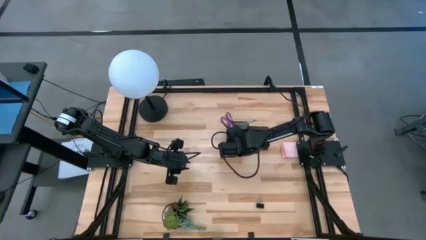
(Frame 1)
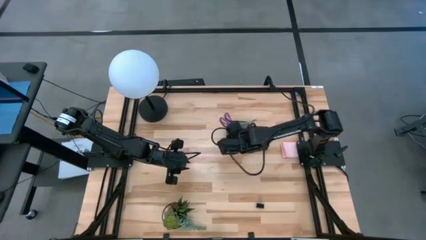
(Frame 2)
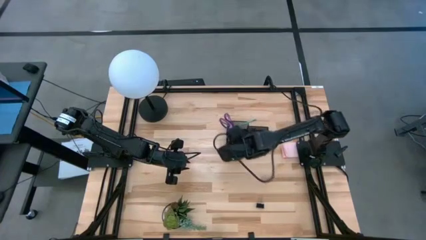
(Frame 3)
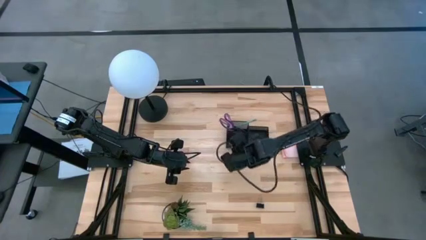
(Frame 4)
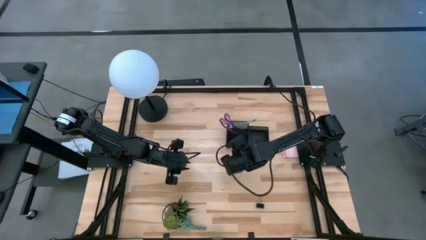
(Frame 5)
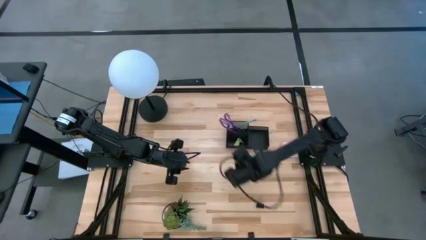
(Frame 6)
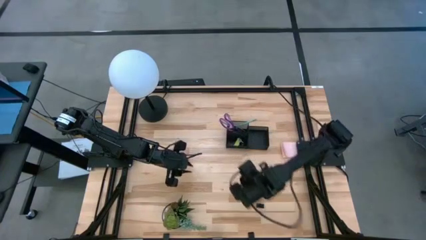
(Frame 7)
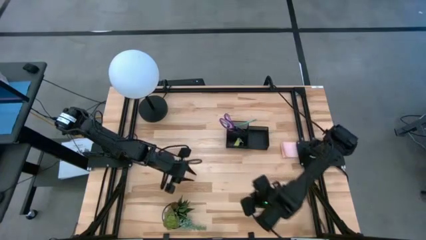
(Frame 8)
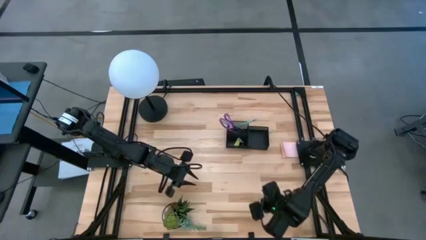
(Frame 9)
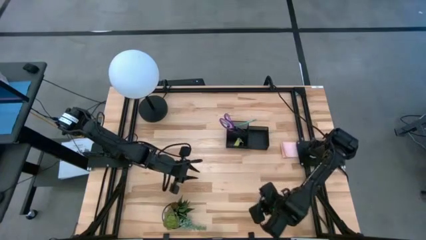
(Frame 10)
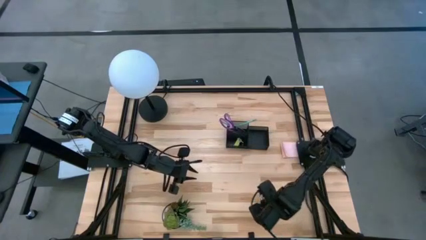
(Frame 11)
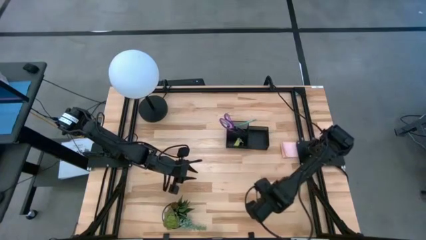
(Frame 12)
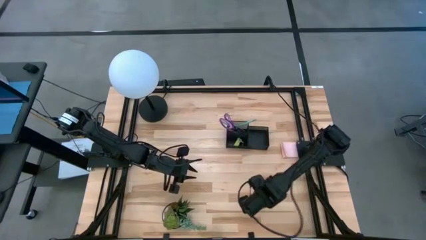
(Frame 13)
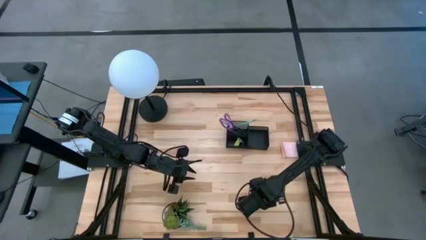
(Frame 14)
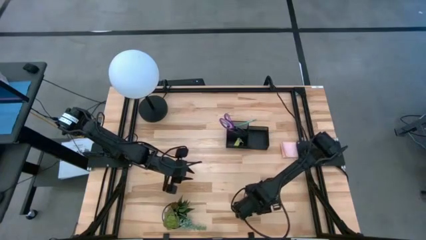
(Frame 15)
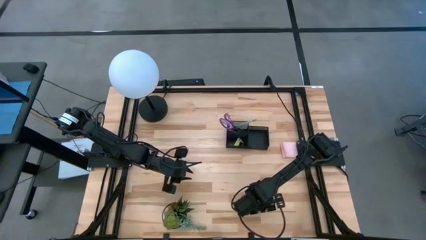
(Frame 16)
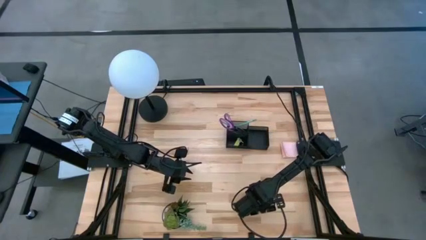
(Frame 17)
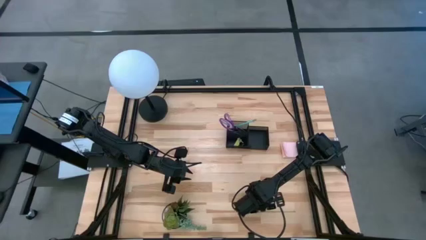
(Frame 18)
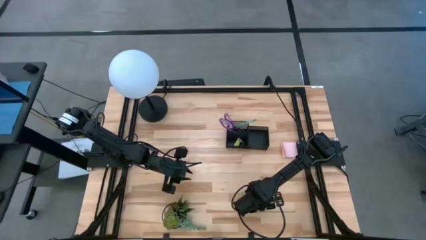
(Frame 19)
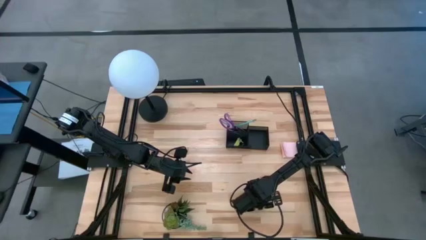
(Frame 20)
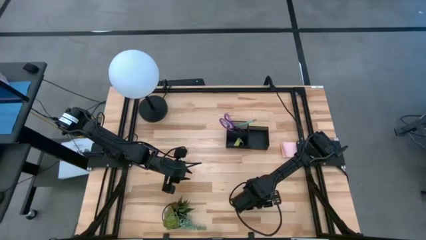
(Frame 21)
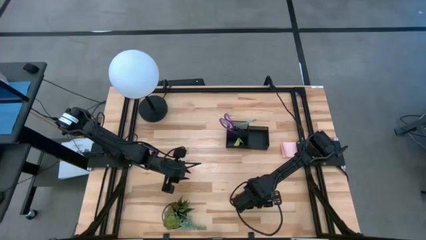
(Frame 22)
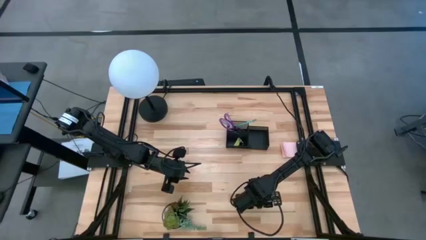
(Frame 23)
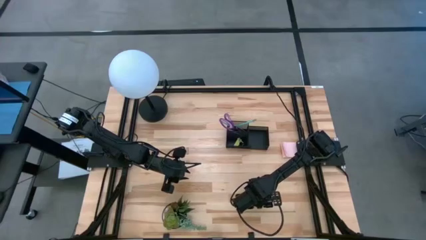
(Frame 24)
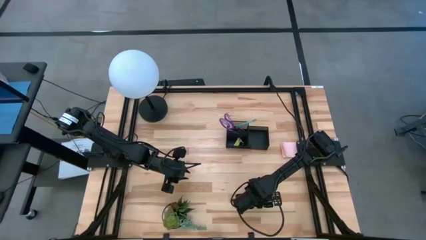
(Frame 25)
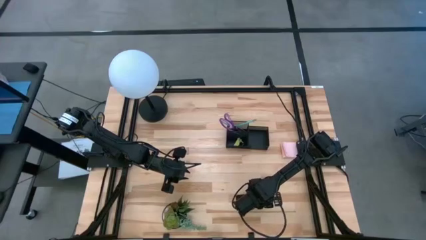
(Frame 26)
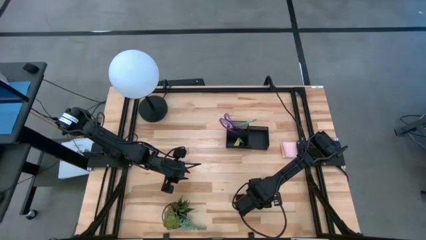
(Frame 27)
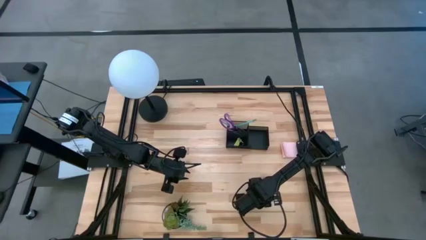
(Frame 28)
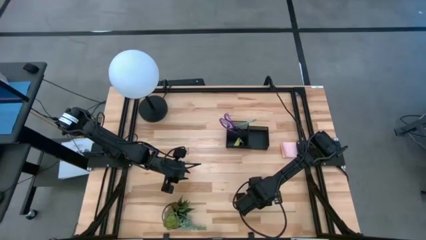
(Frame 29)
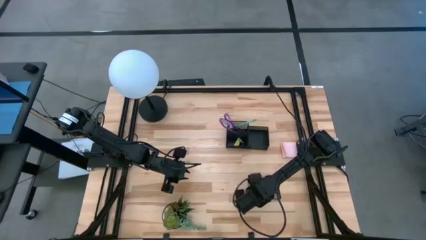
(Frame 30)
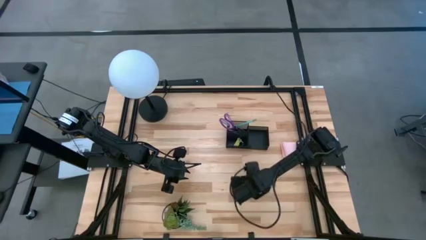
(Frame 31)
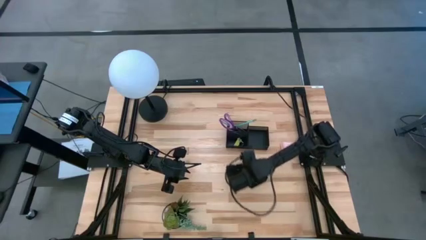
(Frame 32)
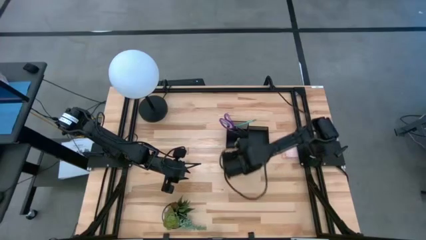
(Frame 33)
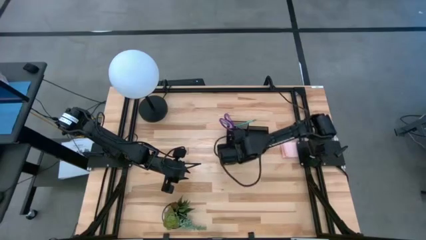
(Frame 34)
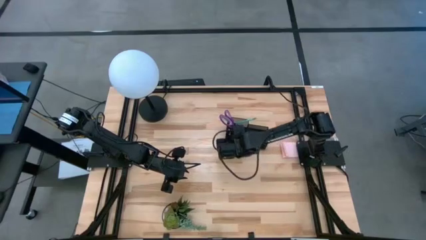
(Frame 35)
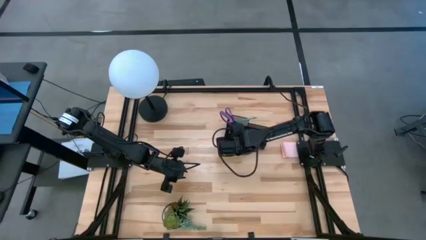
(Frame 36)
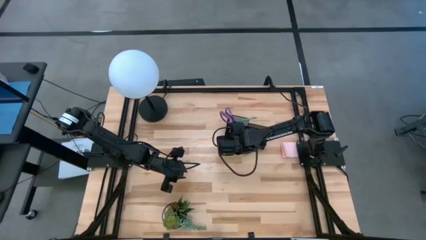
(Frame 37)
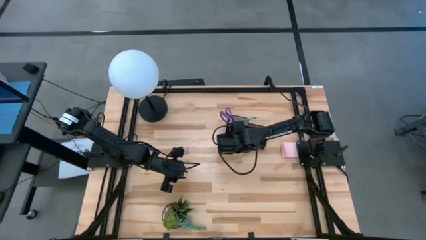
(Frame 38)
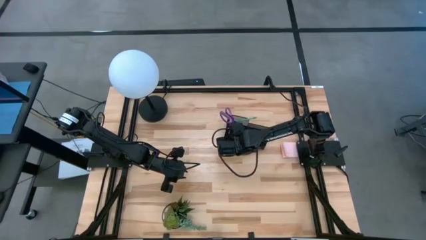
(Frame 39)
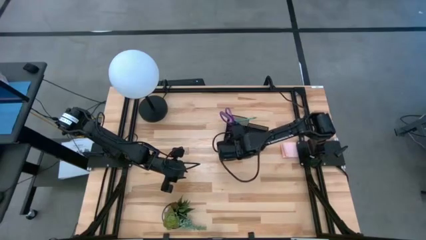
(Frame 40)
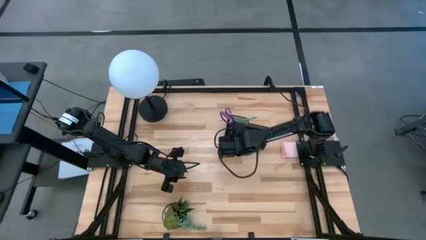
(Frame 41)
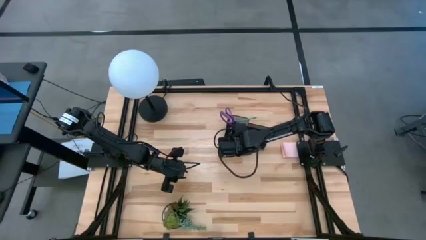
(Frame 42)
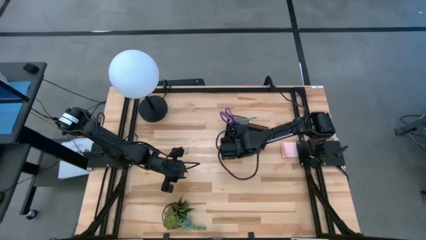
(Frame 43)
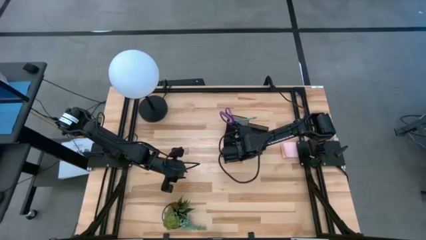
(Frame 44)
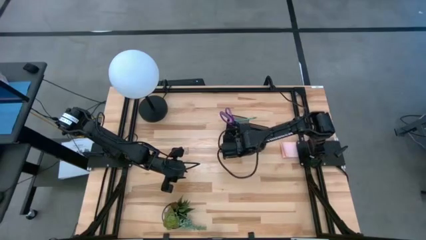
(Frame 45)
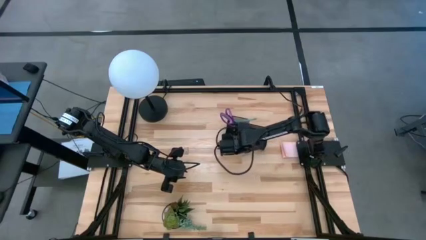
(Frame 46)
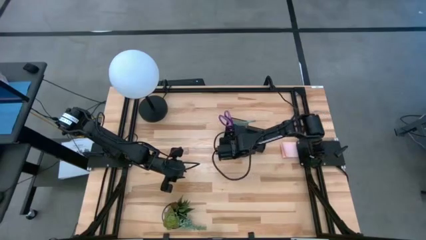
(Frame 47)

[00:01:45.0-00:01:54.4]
Task: Pick and place office supplies into organizer
Put the black binder clip into the black desk organizer

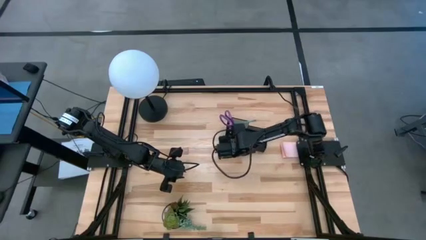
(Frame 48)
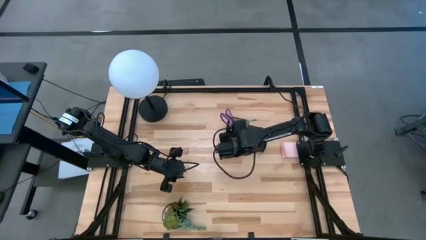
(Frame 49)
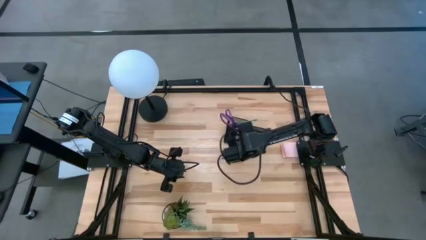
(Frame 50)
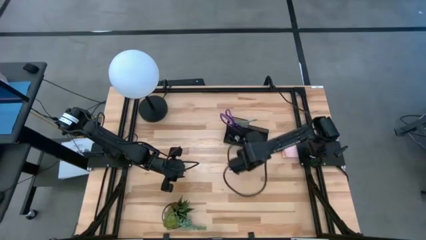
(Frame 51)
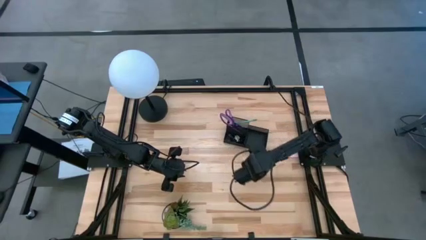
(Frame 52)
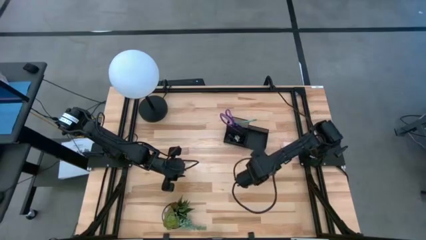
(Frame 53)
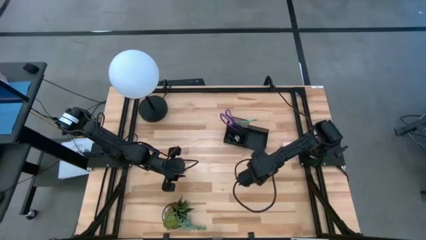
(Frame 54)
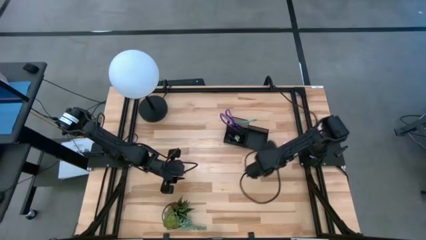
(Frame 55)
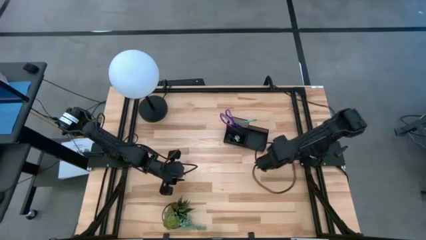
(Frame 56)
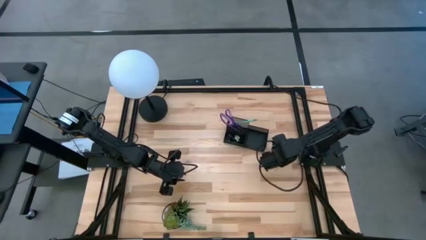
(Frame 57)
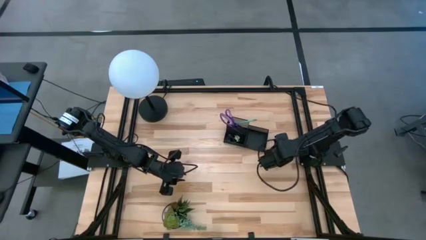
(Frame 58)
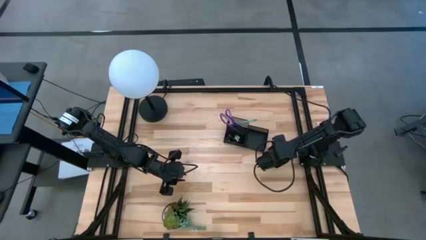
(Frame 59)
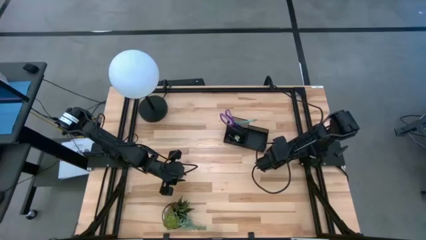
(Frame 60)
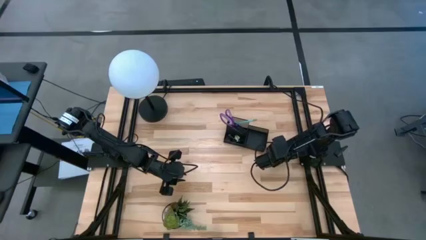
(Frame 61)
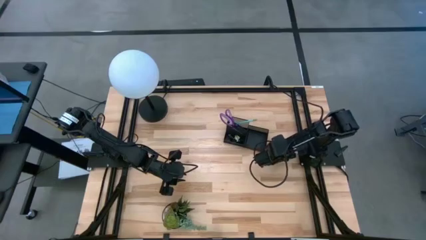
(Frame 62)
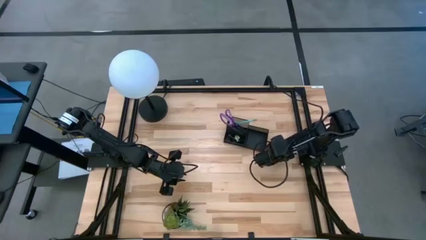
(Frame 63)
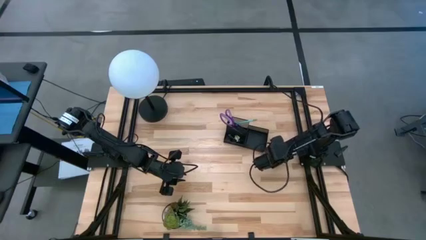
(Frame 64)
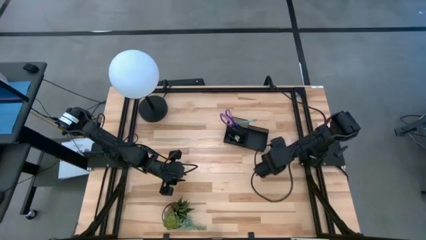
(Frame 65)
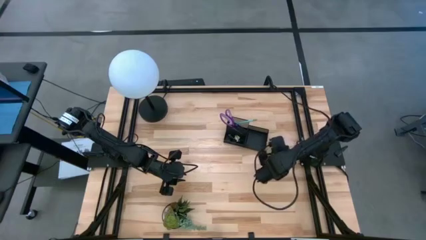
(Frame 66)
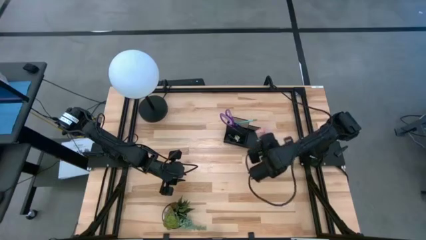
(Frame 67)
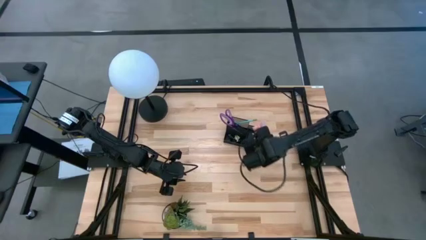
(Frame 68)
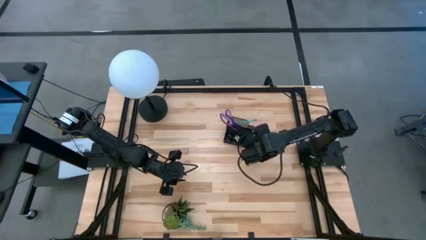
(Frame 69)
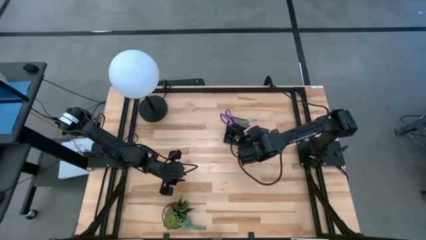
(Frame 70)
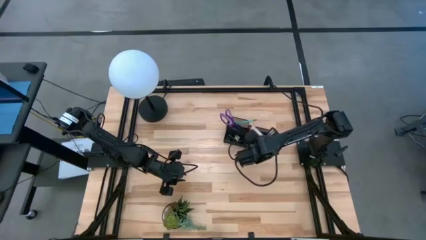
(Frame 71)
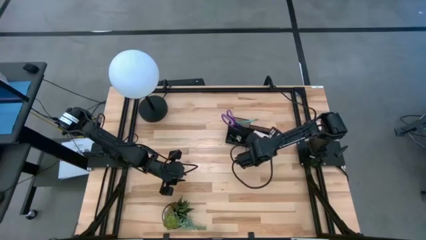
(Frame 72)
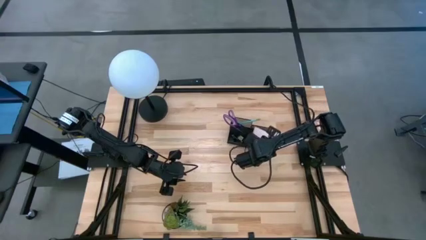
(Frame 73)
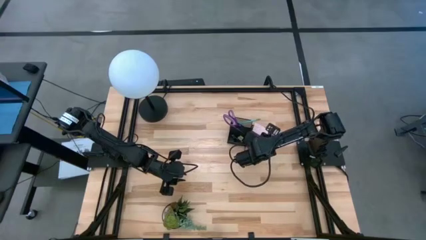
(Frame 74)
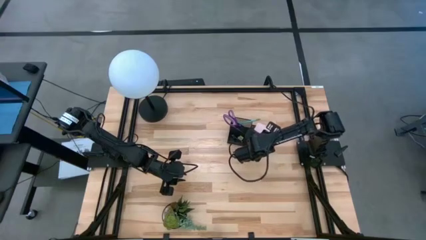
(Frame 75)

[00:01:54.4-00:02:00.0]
Put the pink sticky notes into the black desk organizer
